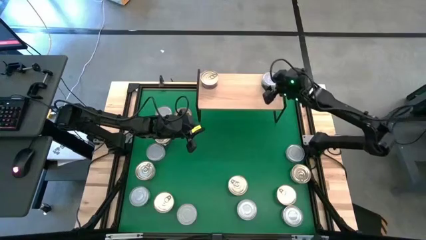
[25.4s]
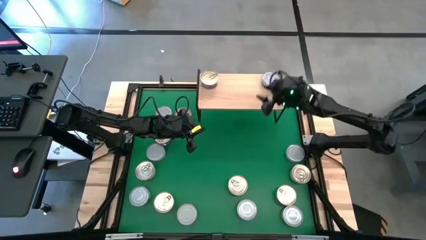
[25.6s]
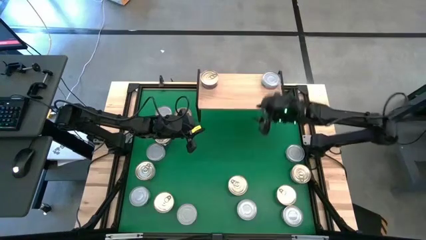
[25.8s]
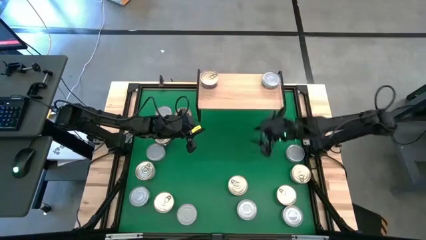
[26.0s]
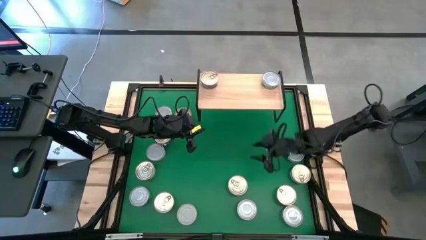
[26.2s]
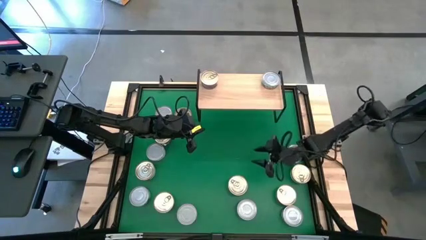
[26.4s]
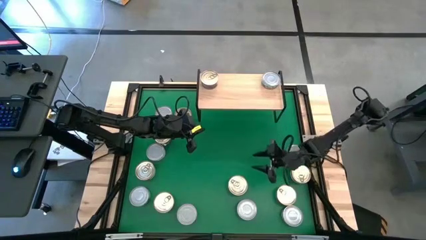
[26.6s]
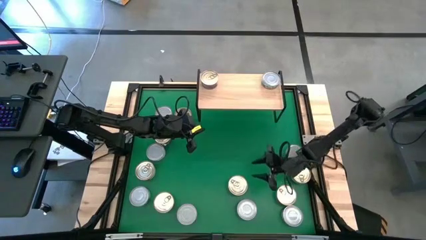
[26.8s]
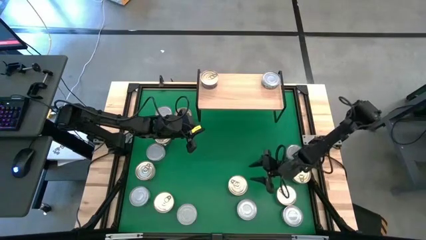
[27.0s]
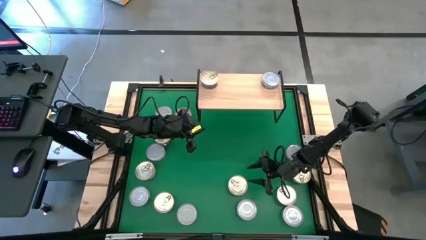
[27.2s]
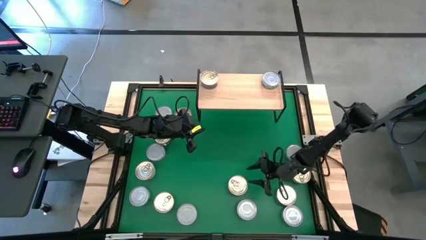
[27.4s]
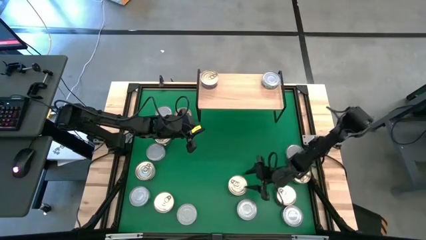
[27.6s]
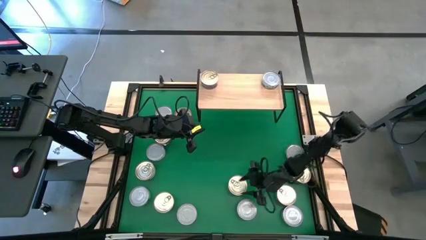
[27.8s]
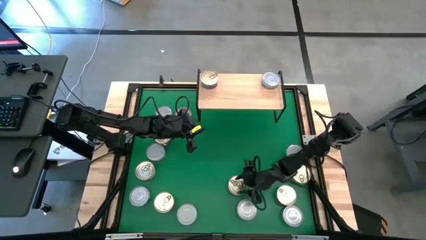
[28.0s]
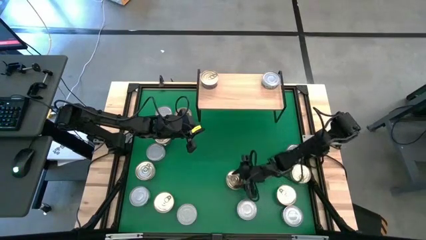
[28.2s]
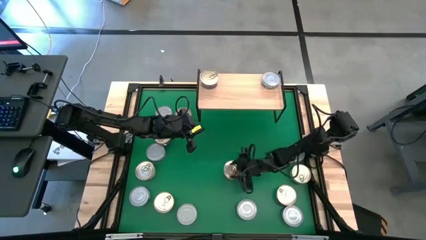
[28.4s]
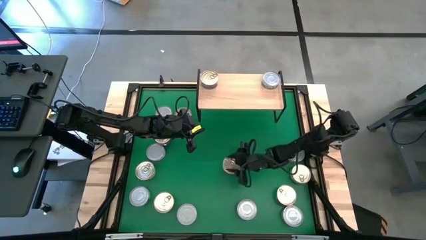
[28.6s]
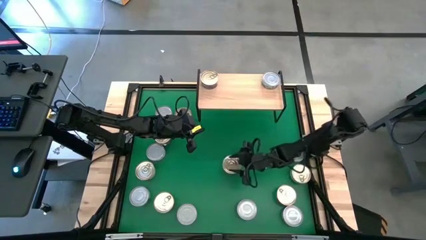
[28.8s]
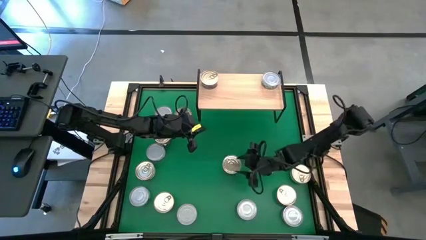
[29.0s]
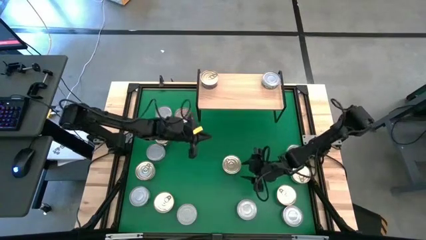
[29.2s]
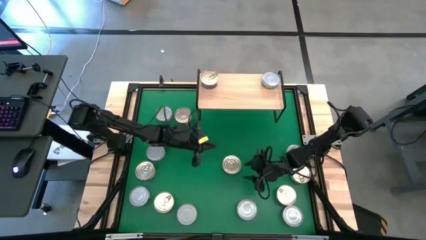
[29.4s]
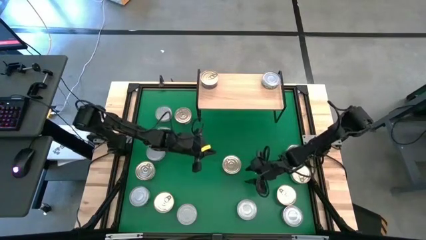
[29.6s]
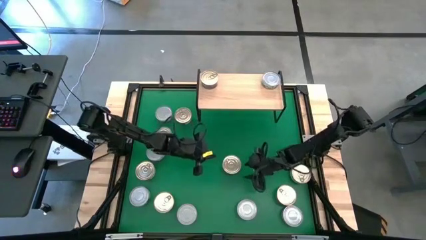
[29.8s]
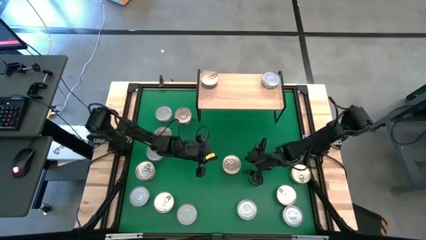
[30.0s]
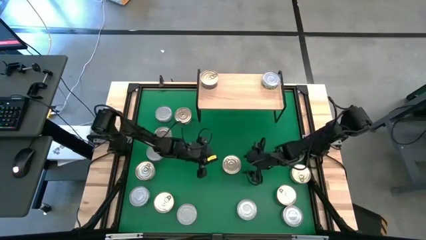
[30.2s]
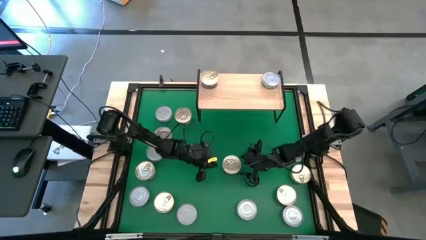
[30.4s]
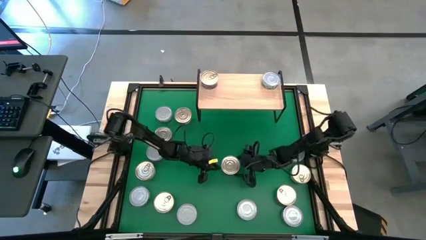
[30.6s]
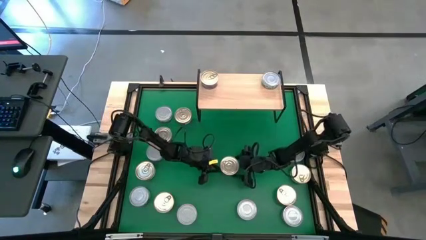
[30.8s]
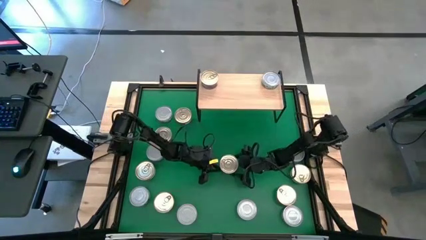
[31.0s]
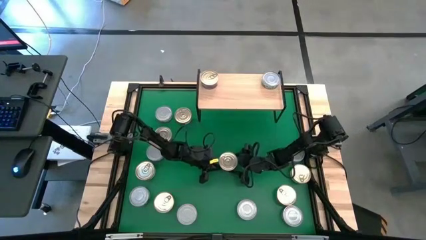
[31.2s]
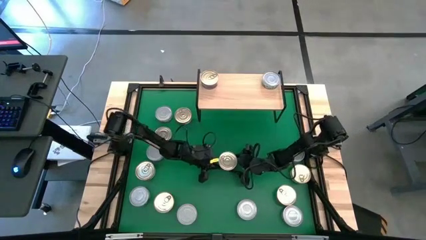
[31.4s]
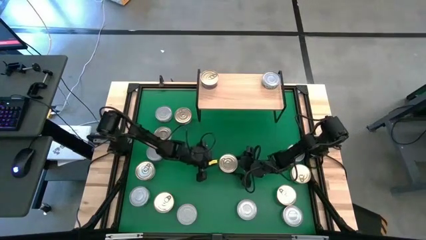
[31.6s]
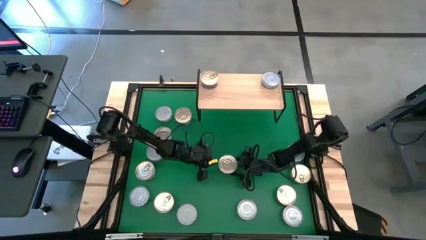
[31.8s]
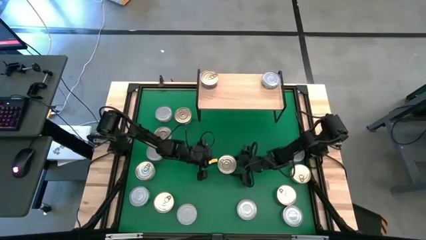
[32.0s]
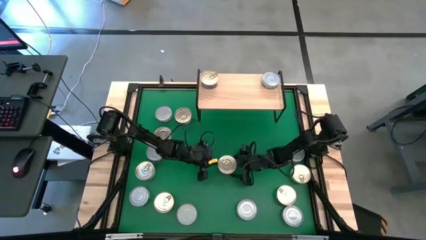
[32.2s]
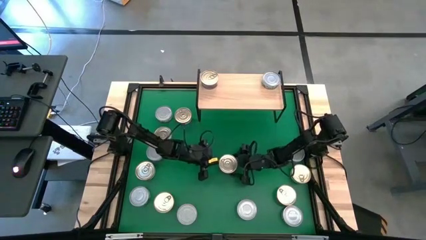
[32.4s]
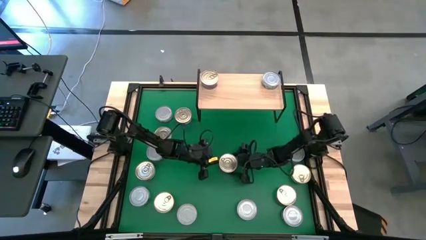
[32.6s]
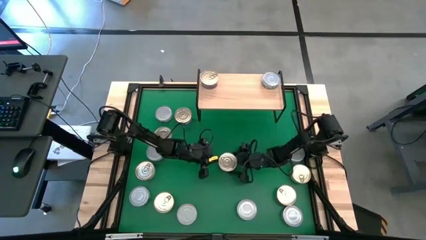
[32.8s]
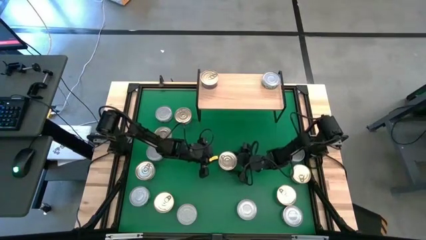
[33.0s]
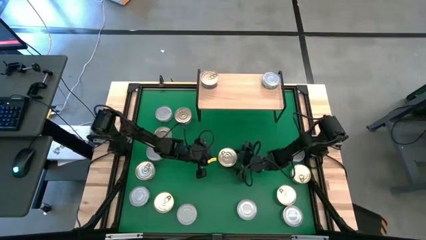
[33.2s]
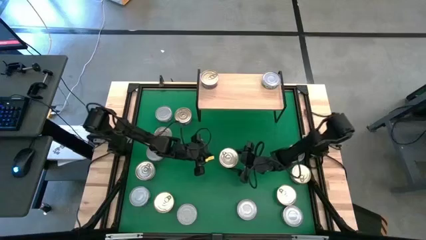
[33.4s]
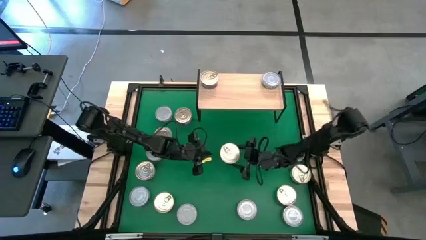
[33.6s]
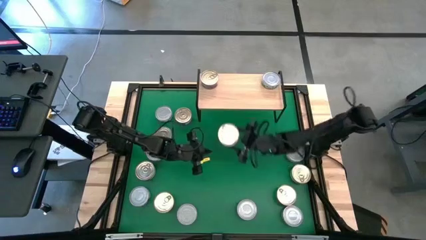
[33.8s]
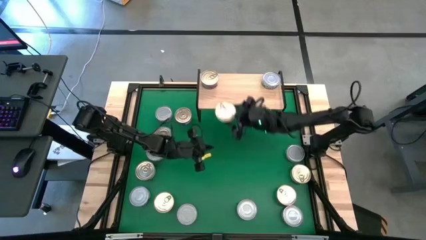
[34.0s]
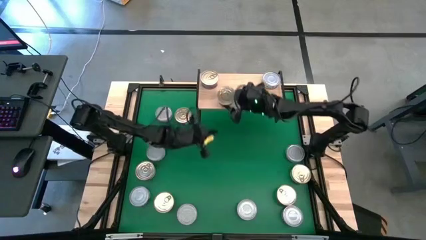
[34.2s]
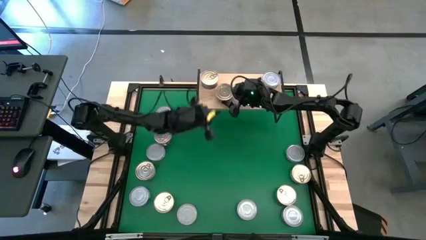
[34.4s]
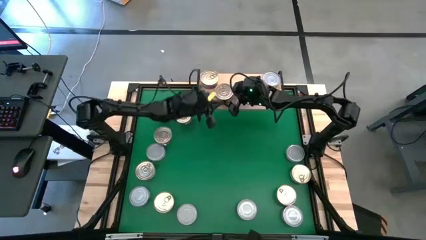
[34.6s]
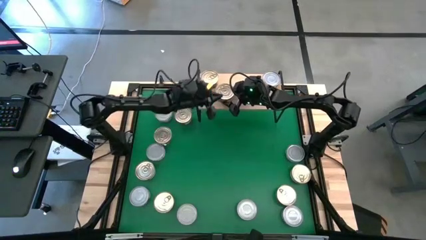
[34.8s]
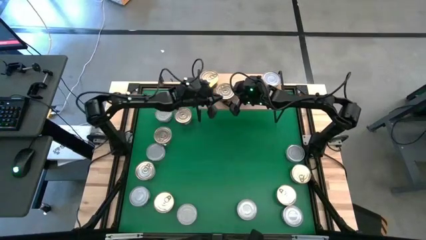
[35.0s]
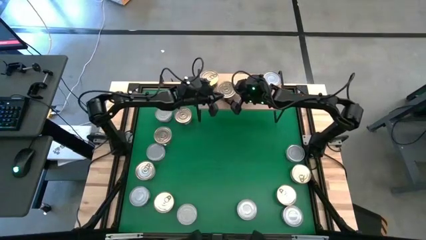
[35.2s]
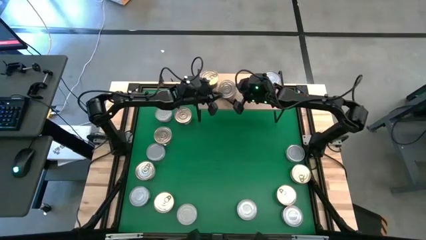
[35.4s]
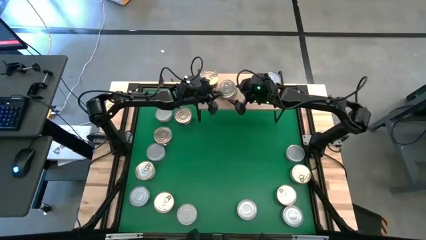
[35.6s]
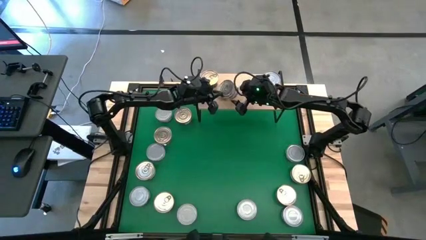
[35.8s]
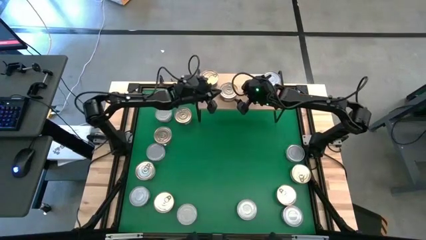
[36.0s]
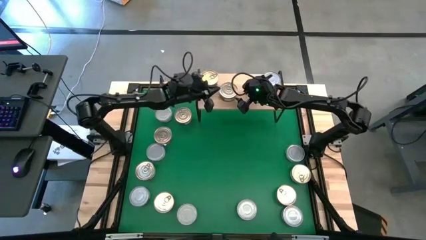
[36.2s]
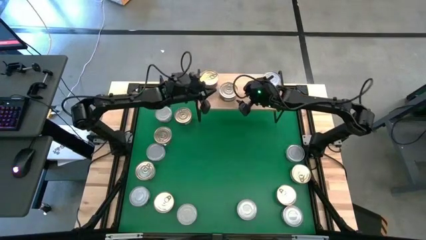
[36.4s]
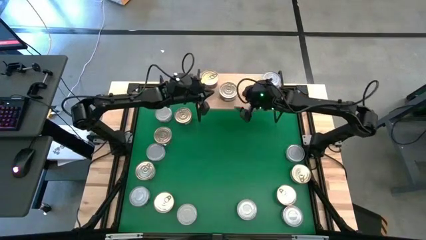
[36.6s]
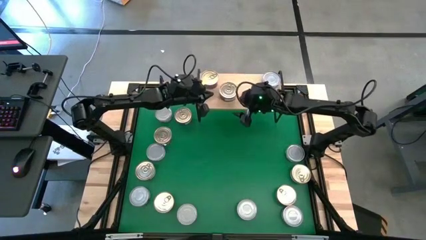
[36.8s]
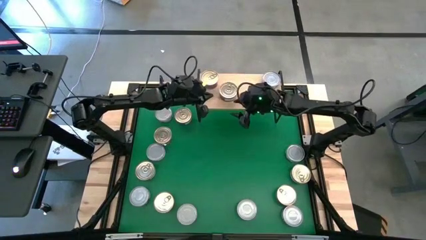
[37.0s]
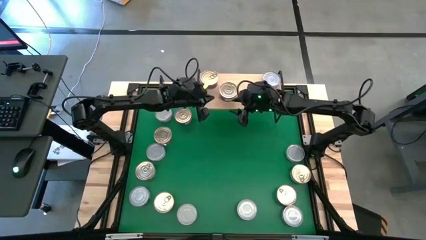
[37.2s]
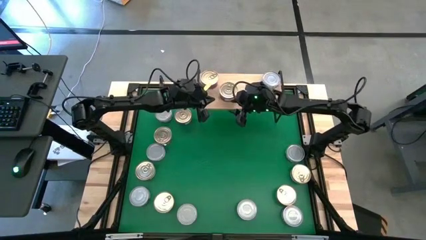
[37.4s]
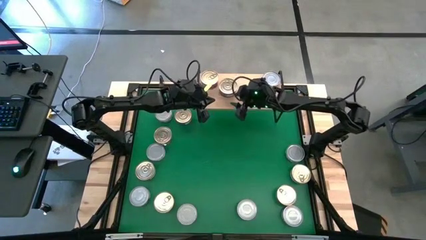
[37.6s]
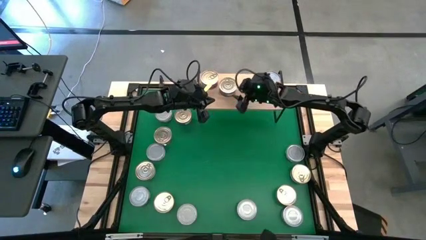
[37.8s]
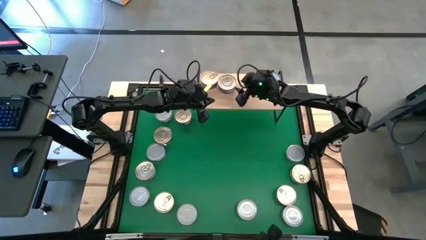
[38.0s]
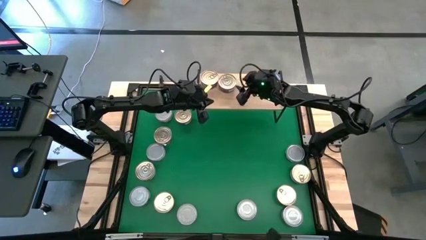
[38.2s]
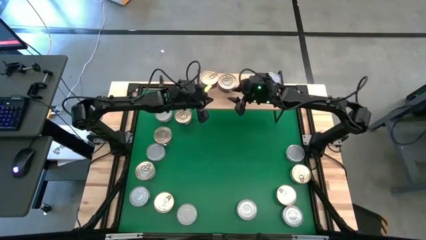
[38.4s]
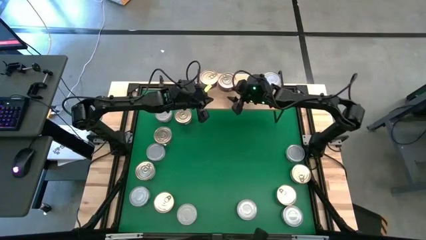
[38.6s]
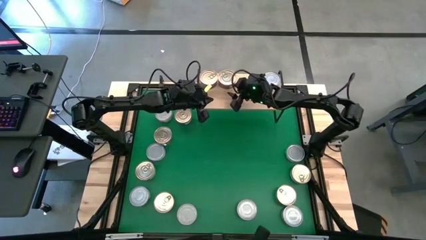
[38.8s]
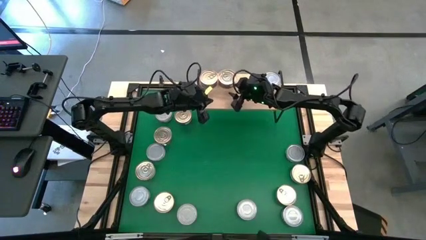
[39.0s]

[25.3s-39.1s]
Task: Stack canned seafood by type on shelf
Put the blue pink tuna can on the shelf

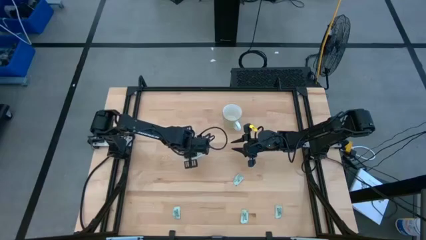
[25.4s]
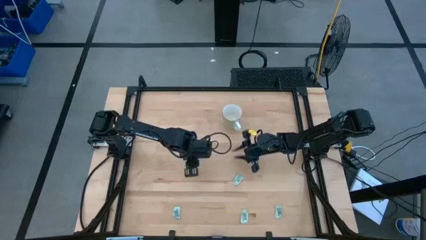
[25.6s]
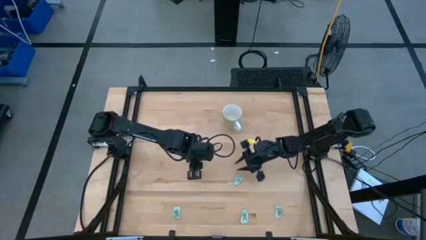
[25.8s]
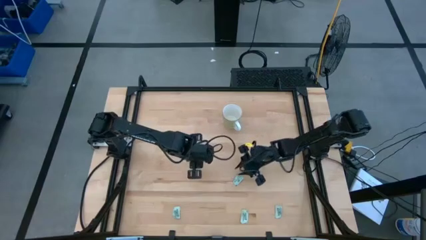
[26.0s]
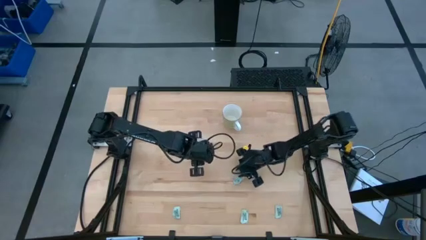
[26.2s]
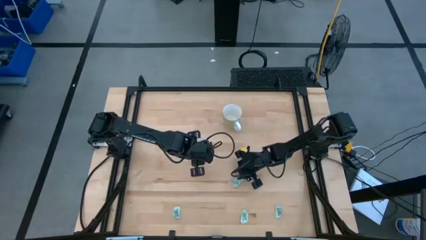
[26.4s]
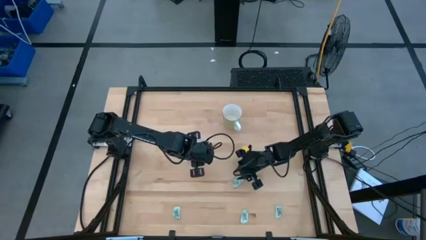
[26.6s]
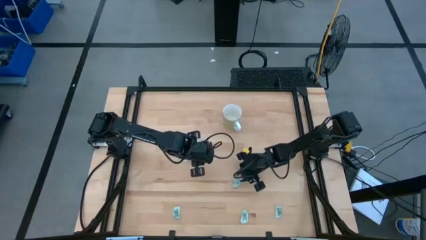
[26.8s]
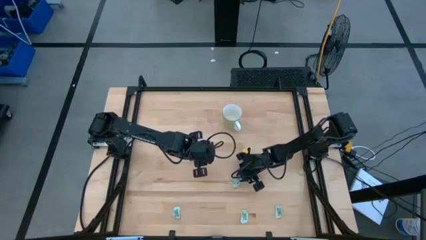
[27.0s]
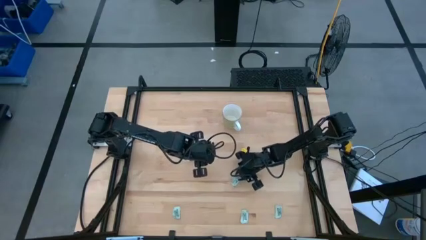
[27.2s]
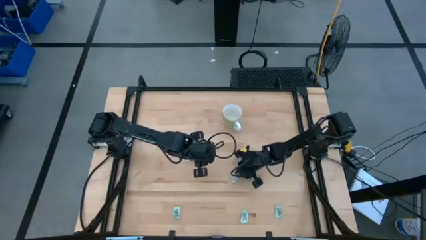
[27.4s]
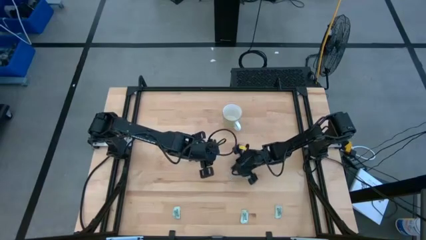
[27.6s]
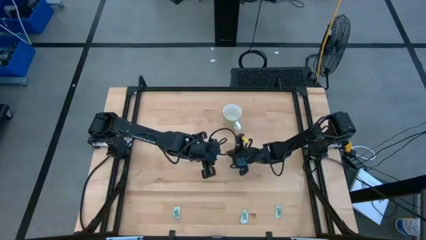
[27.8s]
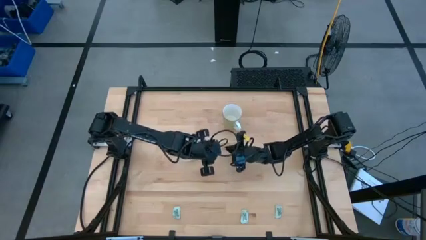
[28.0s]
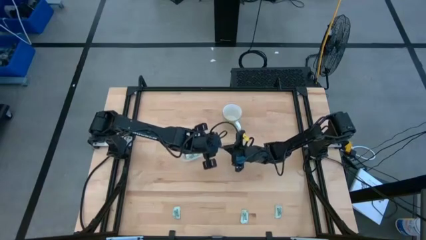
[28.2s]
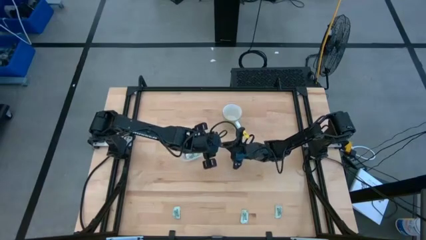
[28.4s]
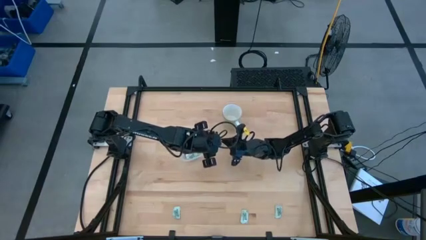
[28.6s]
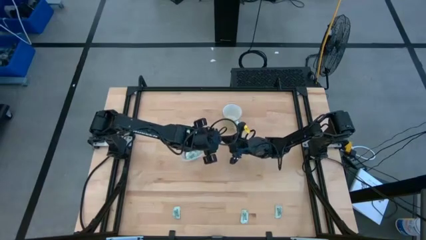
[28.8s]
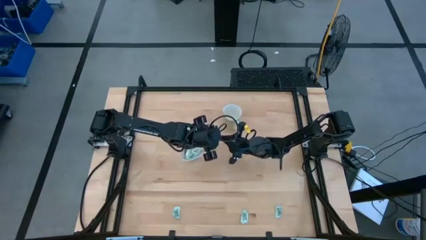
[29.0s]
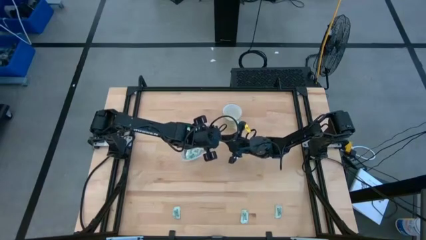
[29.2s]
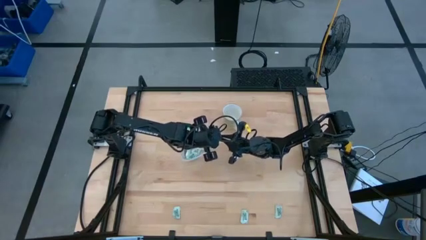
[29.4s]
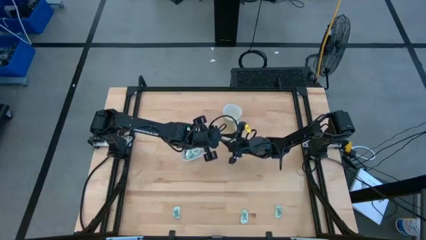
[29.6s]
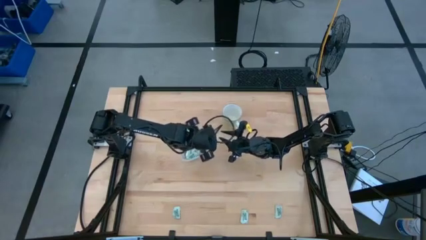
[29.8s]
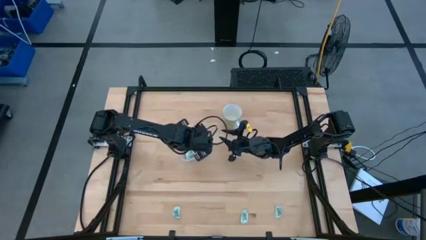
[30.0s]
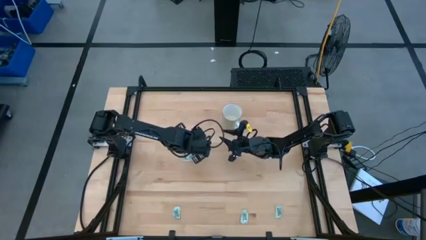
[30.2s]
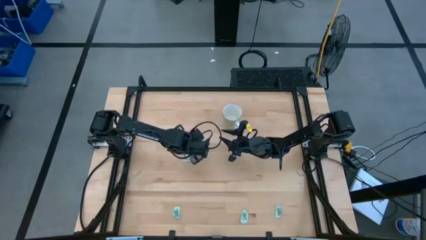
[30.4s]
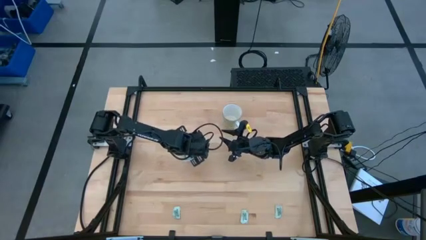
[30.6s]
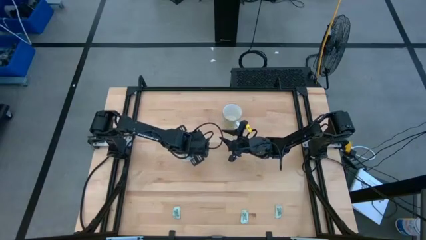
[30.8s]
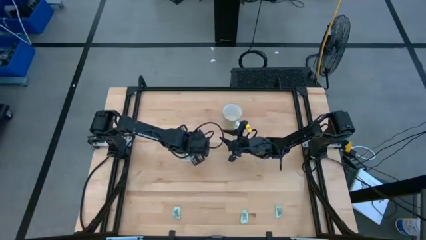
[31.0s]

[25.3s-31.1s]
Task: Pick and place Stevia / Truvia into bins
Put the white stevia packet into the bin
